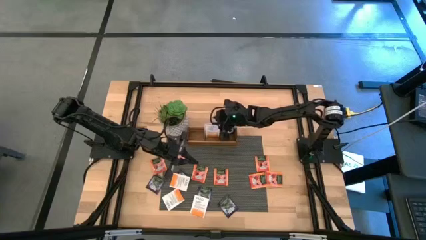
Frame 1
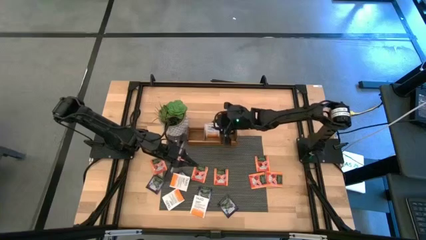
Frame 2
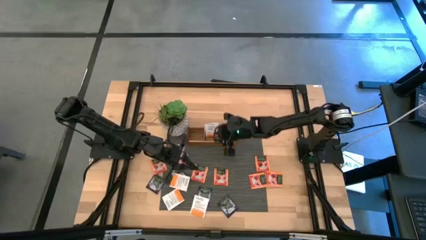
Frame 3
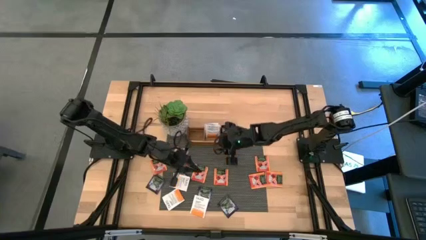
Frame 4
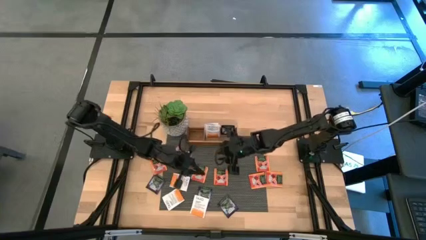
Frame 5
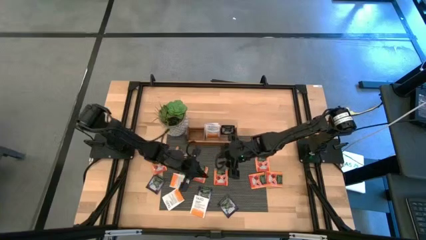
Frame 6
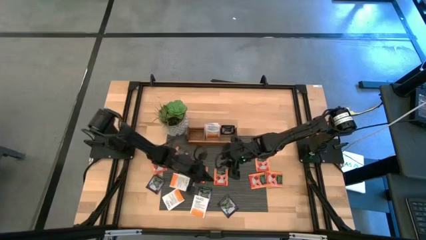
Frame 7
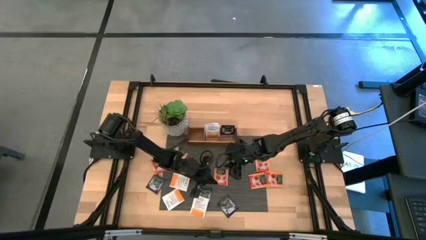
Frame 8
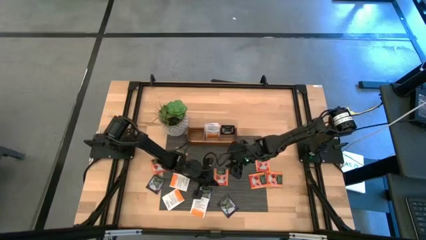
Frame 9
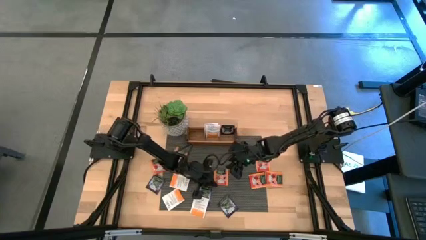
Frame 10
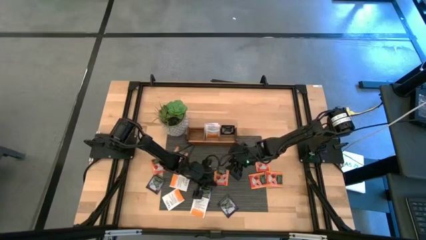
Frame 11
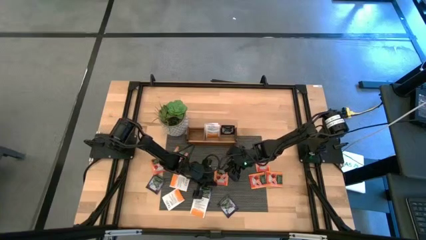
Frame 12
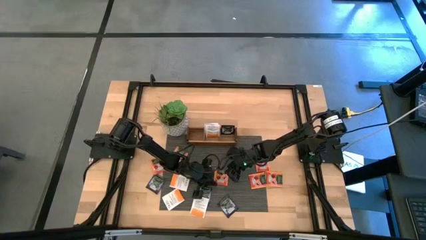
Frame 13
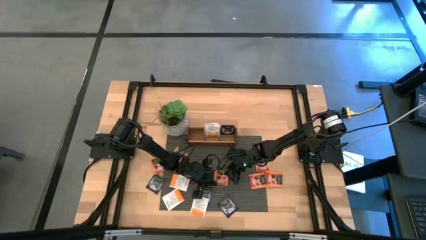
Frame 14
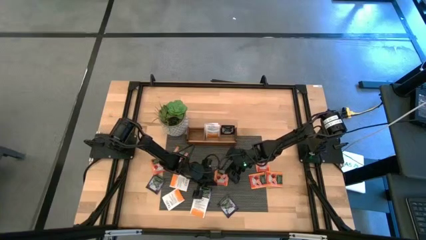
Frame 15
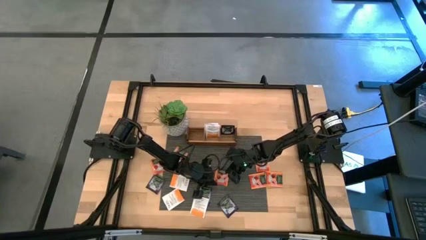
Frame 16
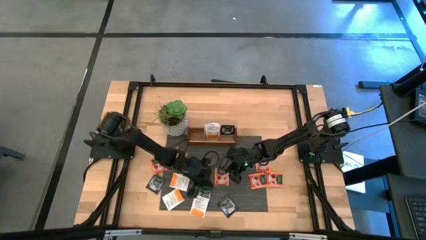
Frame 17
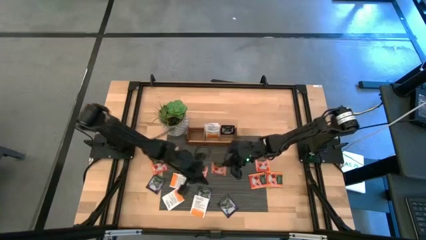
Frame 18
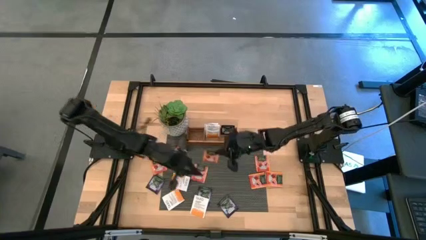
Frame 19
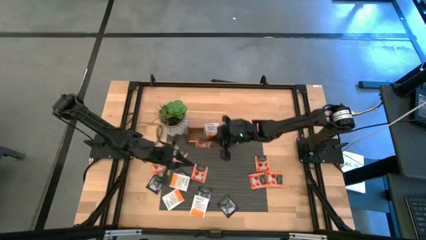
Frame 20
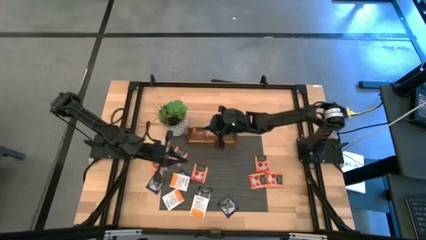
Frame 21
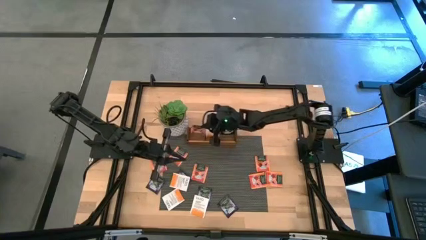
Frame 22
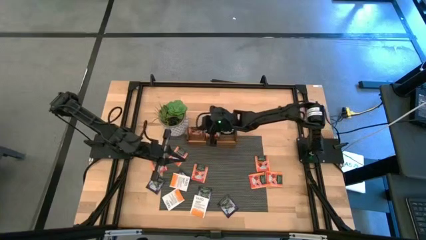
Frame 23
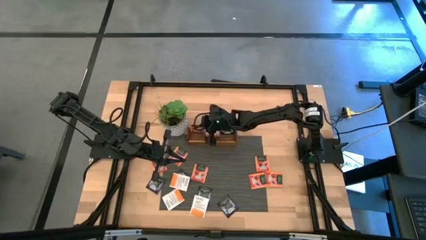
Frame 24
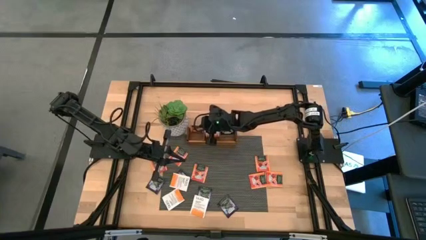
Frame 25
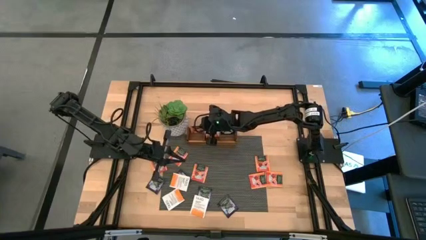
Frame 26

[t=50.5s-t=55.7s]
Task: Pick & Place Tea
Put the orange tea bag into the left slot of the wooden organizer

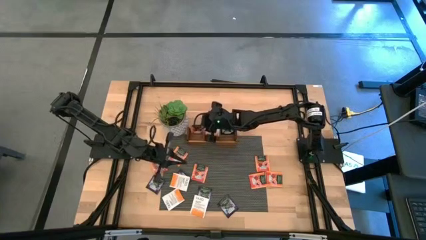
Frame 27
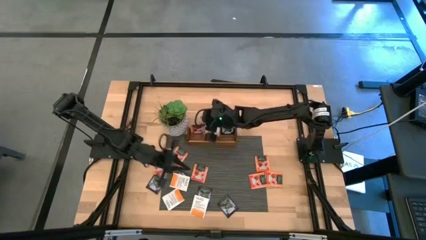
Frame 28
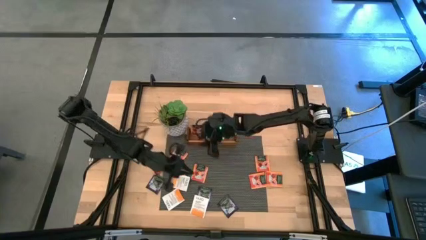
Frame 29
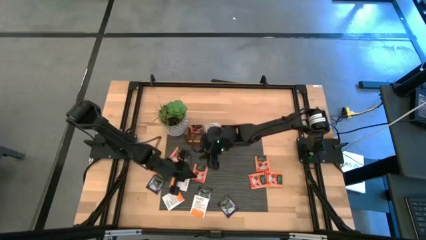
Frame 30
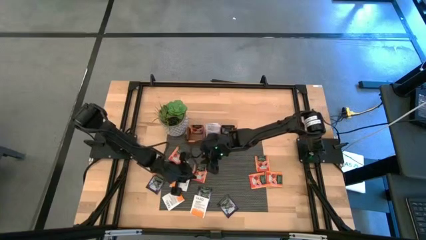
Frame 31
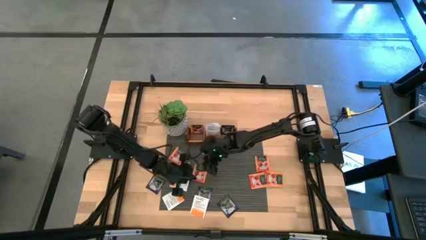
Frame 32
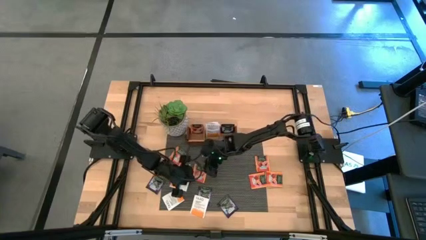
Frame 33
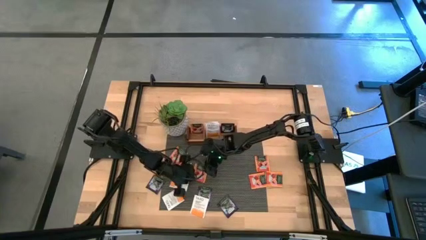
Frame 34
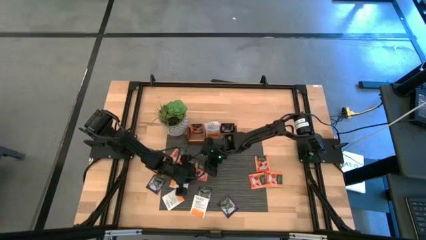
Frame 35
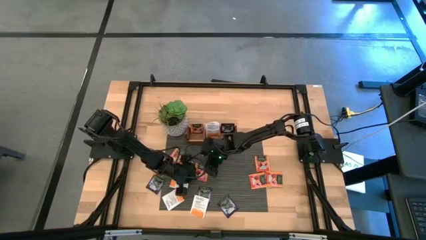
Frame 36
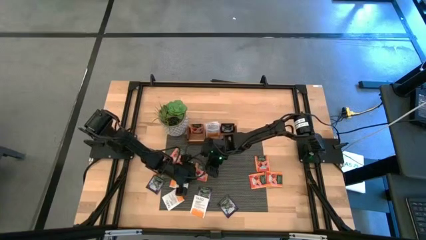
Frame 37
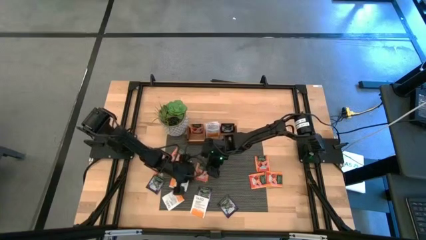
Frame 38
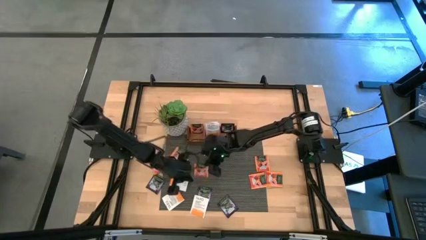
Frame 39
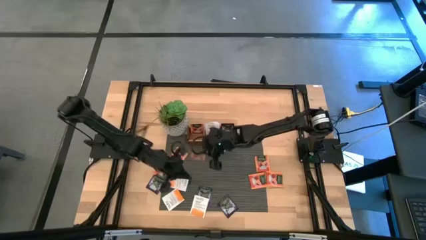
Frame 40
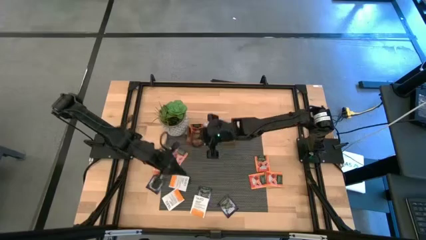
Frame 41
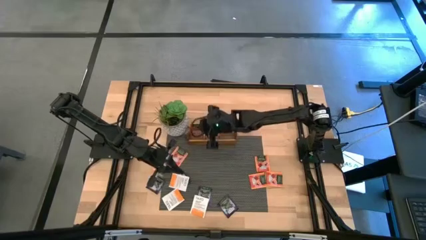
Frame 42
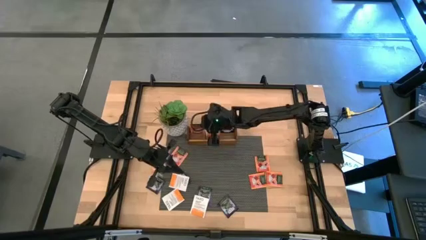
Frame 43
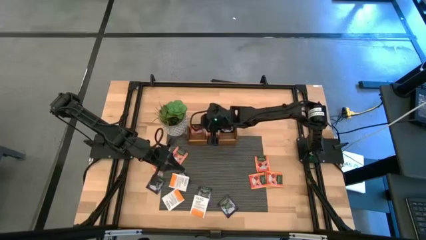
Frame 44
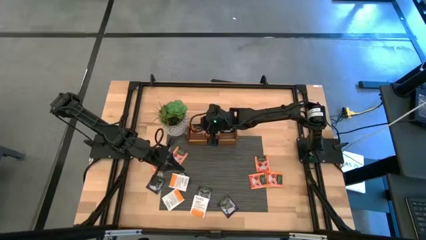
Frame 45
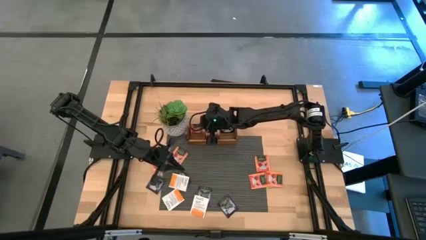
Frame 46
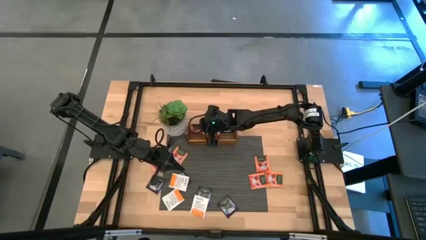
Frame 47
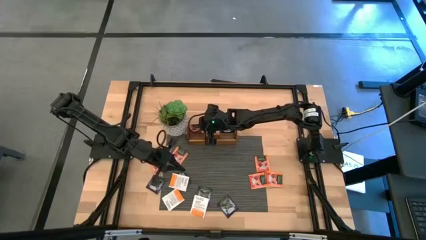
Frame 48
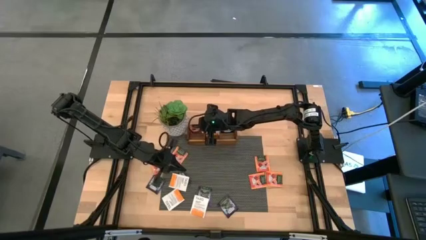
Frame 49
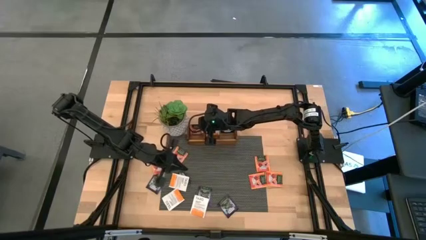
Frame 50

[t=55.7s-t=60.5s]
Put the orange tea bag into the left slot of the wooden organizer

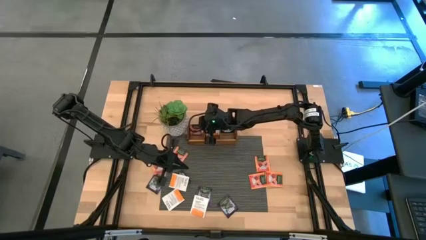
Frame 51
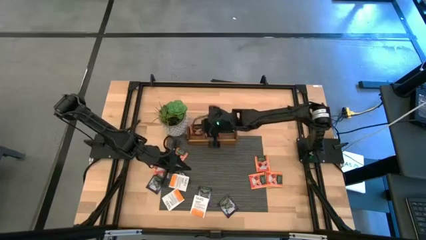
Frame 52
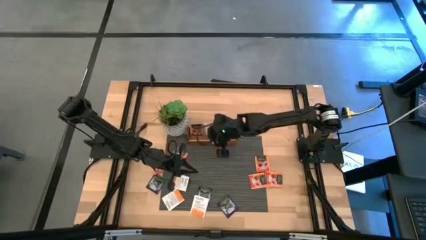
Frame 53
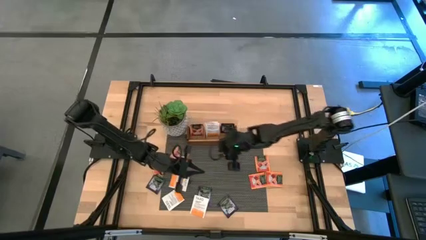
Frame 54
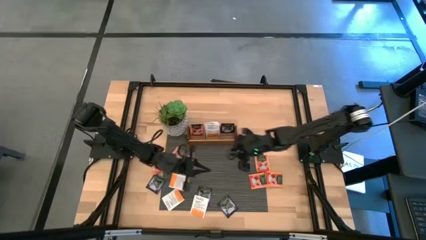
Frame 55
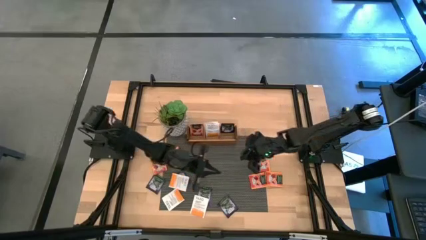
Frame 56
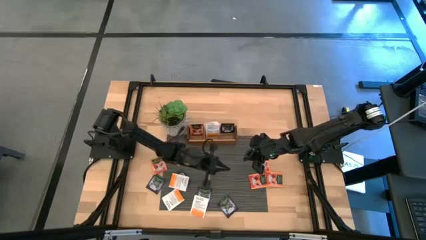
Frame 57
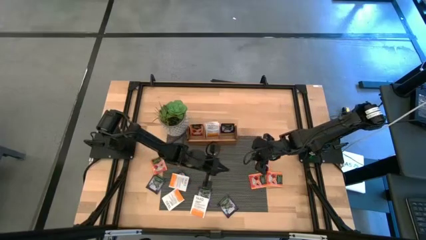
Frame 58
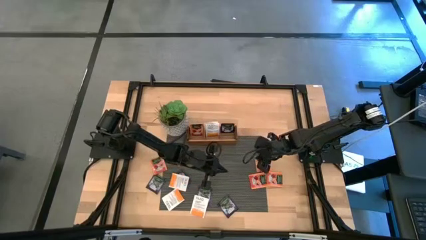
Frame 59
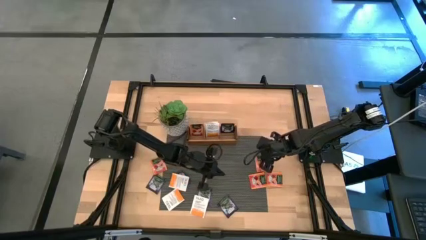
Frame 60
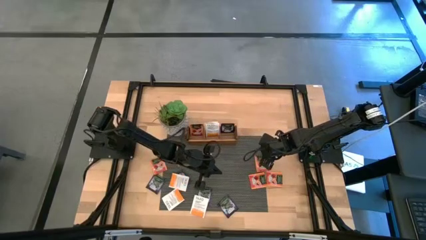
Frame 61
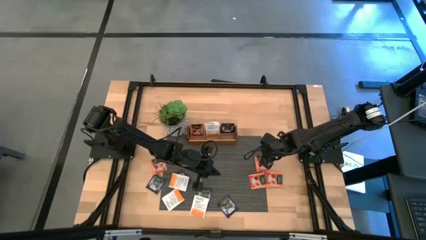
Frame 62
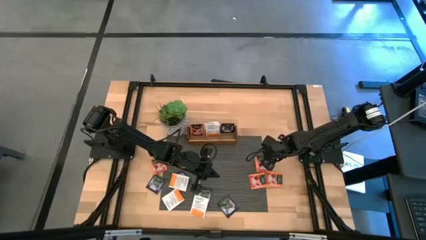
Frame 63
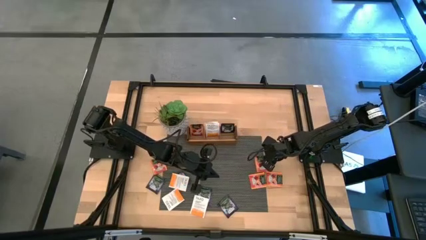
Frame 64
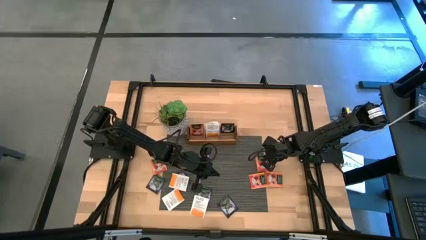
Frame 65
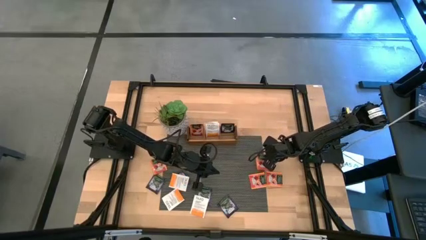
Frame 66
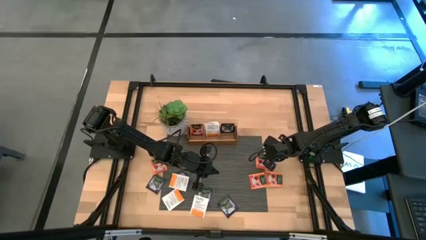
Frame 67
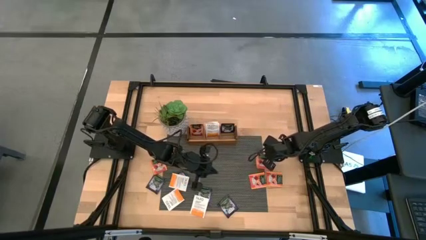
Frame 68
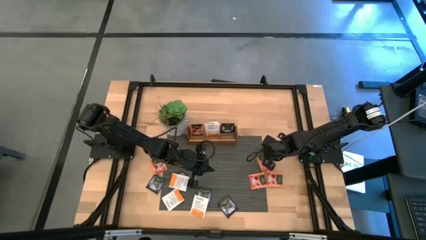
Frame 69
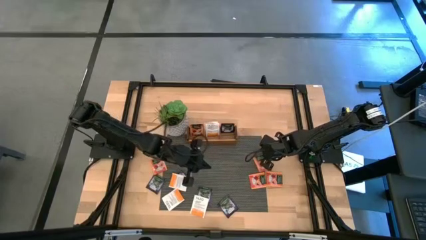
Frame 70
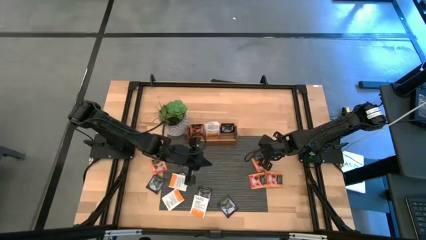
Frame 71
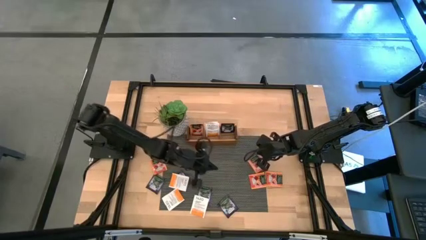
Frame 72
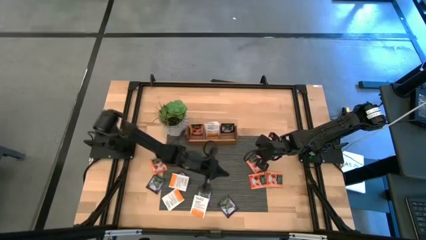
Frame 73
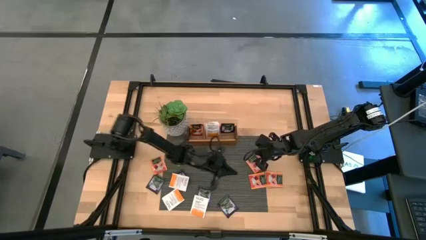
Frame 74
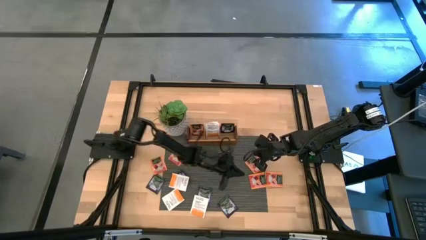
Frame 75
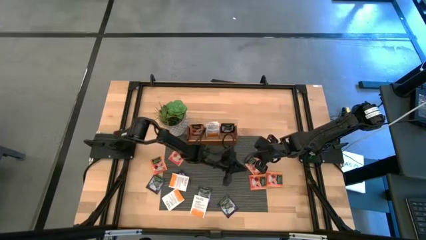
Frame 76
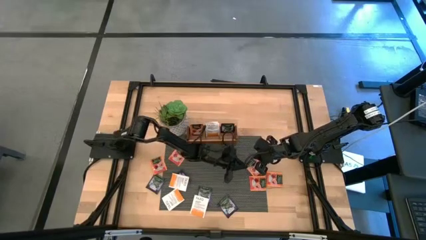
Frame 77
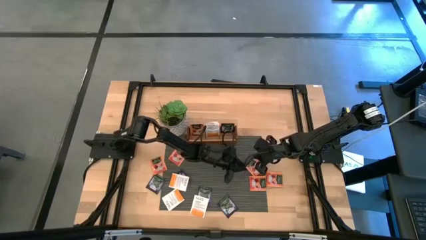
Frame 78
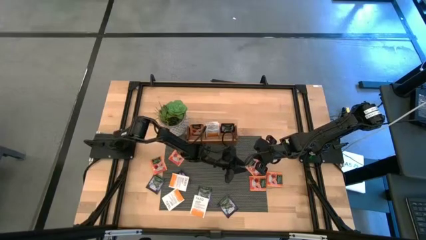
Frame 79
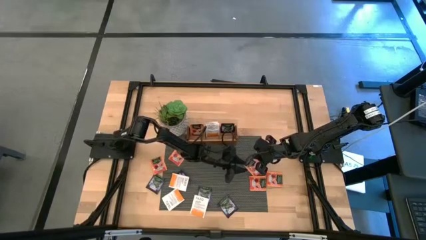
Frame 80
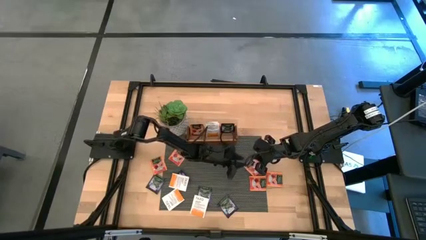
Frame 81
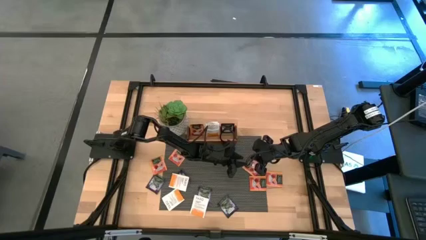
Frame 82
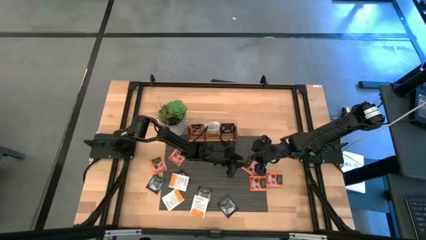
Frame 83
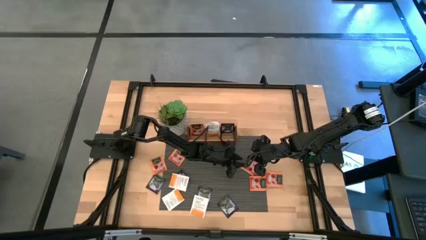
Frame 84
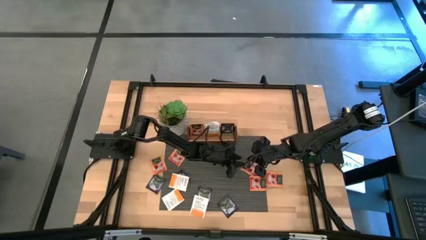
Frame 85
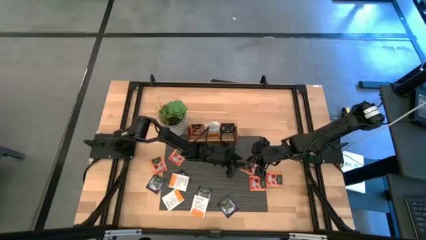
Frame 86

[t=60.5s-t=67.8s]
Put the orange tea bag into the left slot of the wooden organizer
